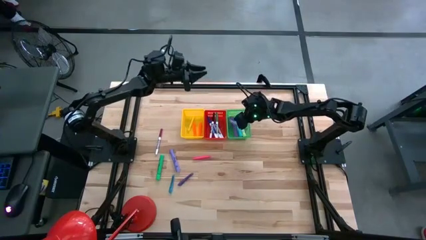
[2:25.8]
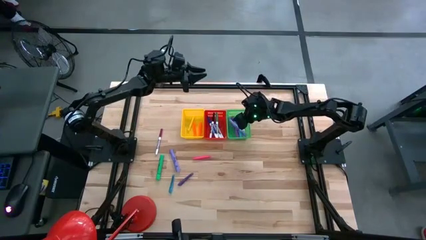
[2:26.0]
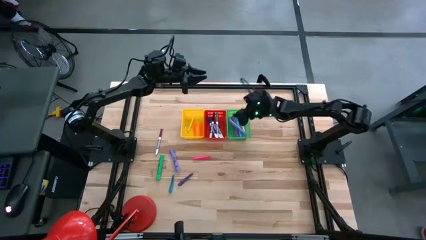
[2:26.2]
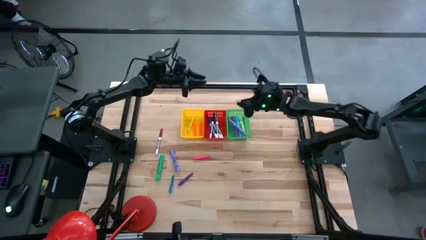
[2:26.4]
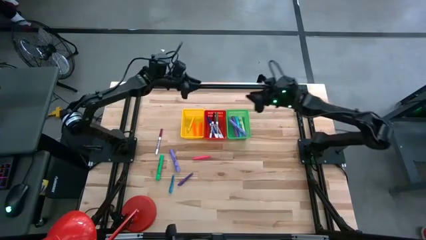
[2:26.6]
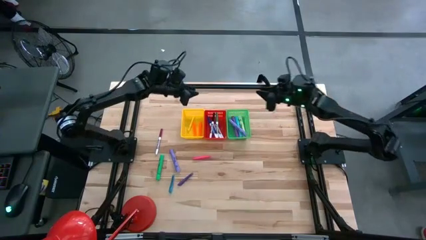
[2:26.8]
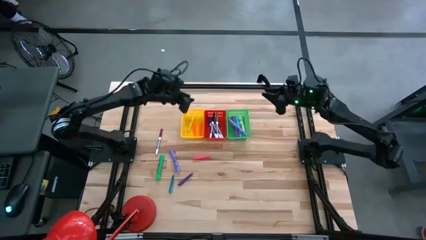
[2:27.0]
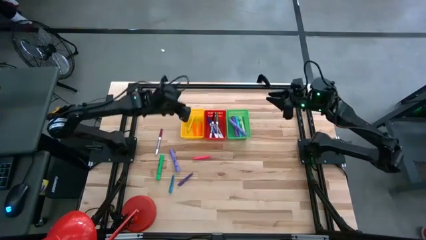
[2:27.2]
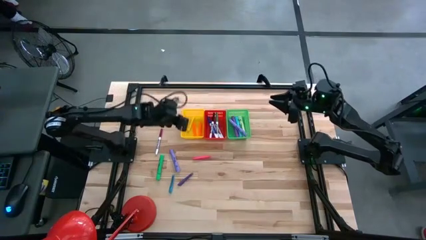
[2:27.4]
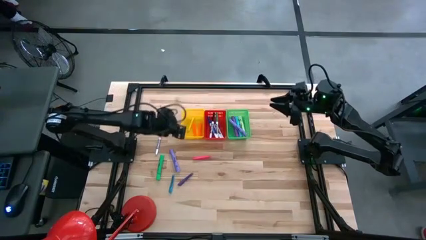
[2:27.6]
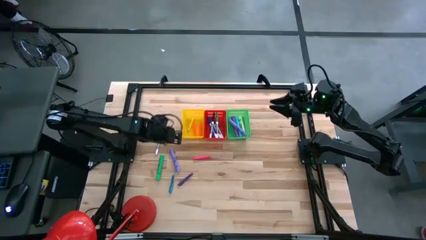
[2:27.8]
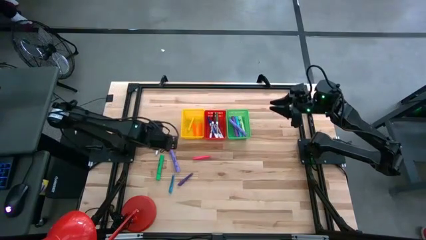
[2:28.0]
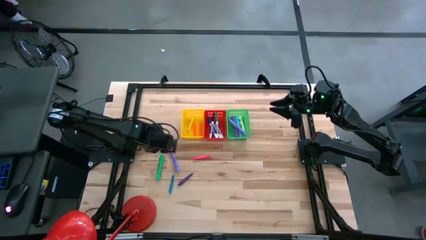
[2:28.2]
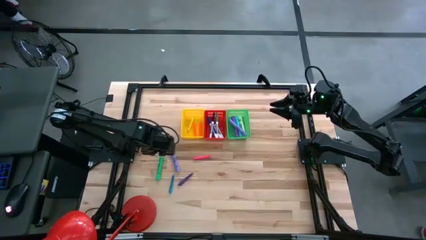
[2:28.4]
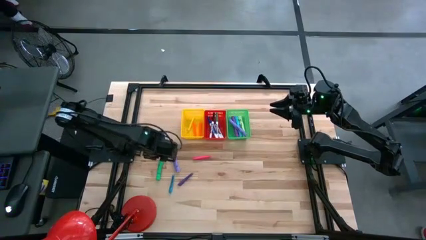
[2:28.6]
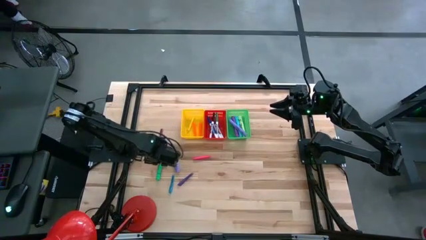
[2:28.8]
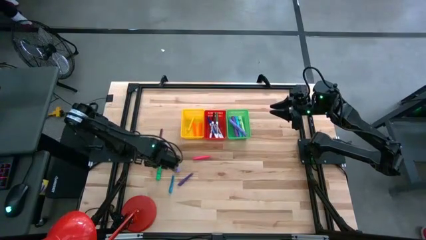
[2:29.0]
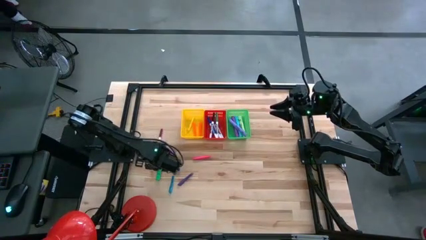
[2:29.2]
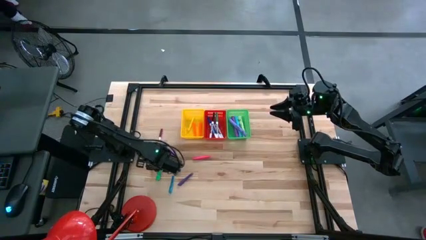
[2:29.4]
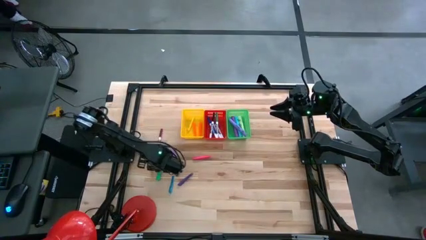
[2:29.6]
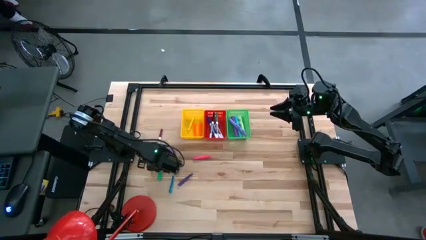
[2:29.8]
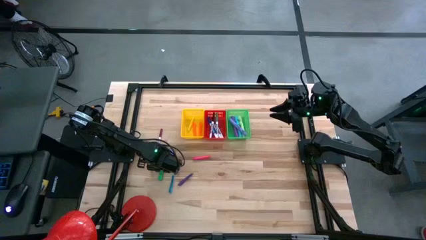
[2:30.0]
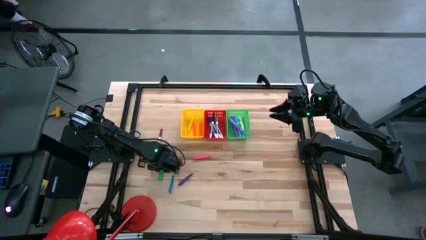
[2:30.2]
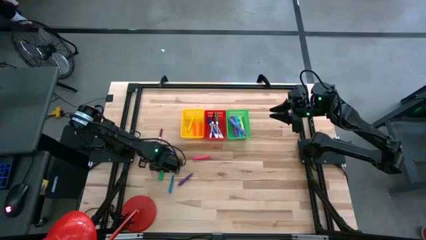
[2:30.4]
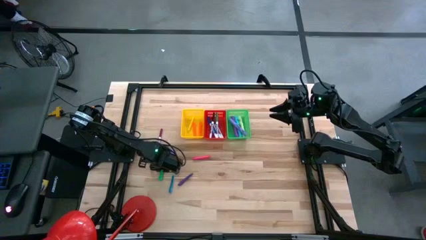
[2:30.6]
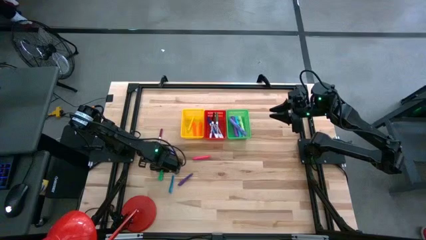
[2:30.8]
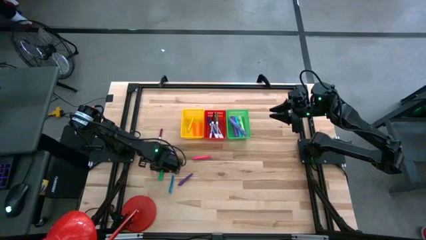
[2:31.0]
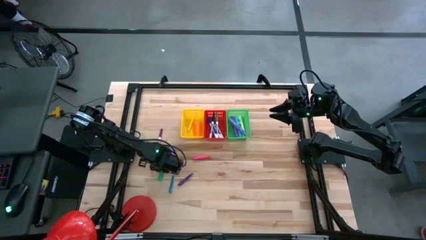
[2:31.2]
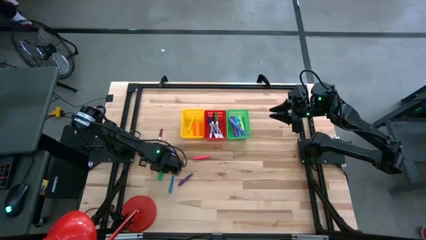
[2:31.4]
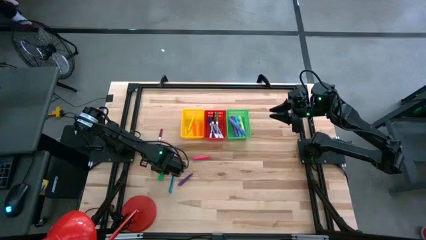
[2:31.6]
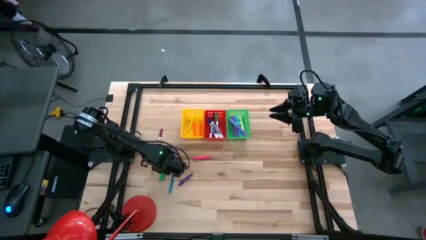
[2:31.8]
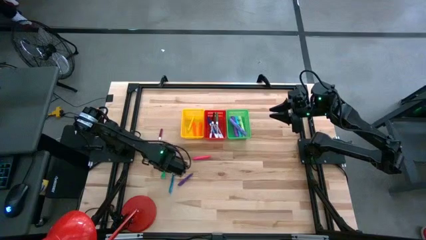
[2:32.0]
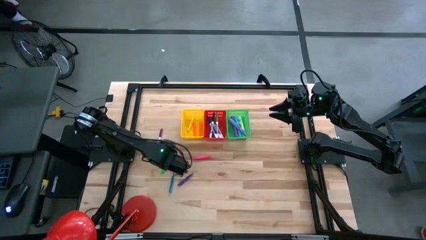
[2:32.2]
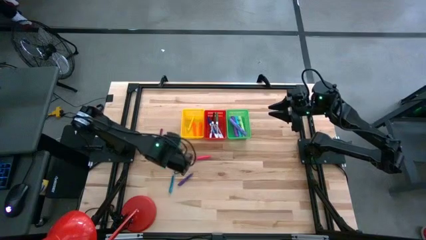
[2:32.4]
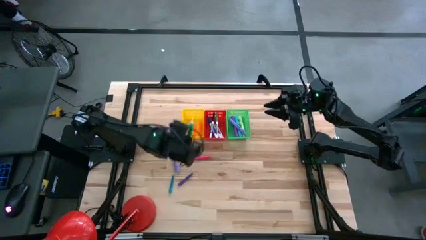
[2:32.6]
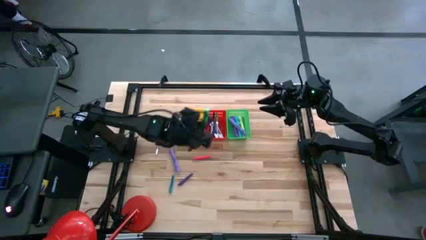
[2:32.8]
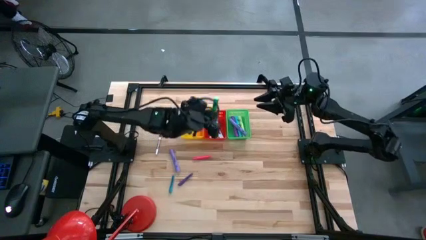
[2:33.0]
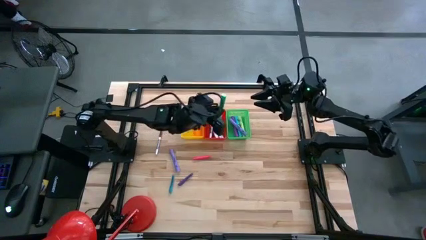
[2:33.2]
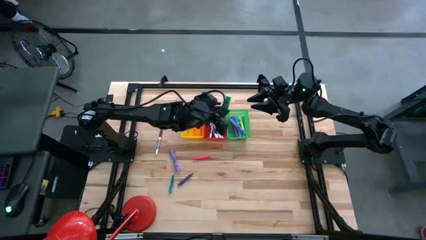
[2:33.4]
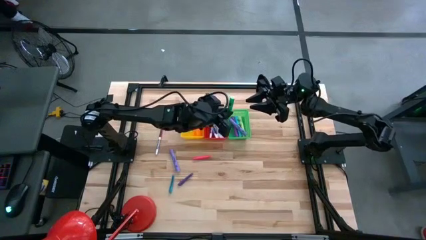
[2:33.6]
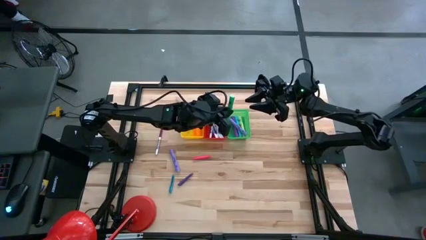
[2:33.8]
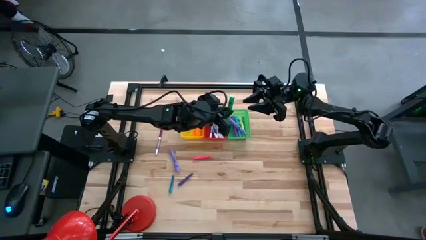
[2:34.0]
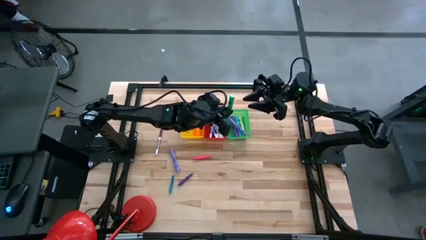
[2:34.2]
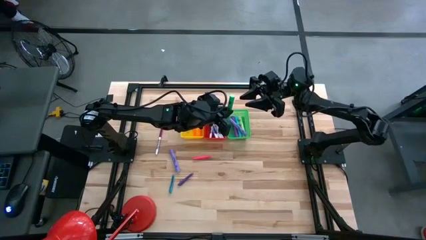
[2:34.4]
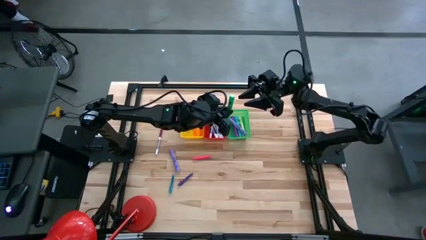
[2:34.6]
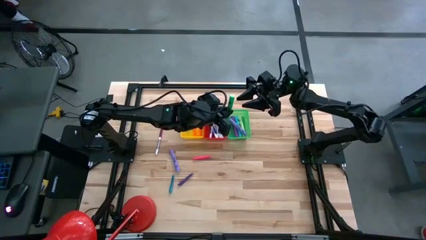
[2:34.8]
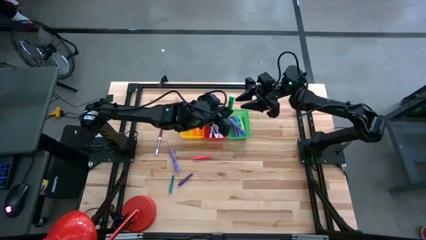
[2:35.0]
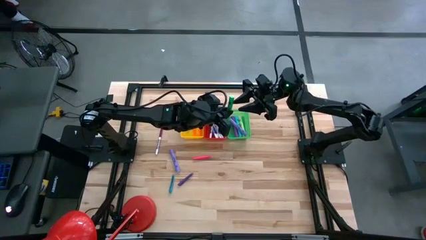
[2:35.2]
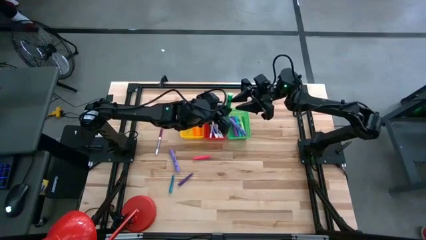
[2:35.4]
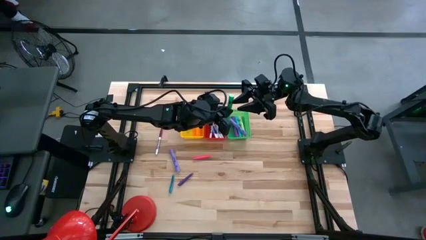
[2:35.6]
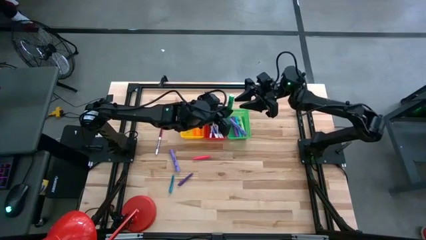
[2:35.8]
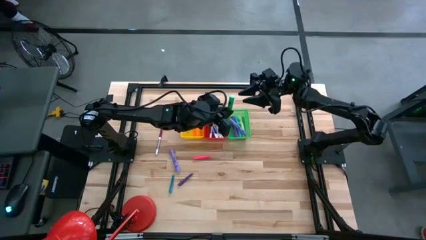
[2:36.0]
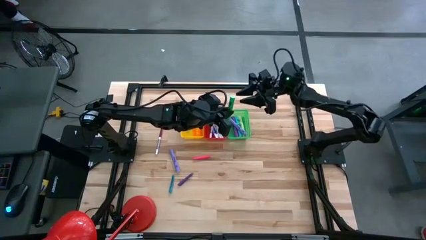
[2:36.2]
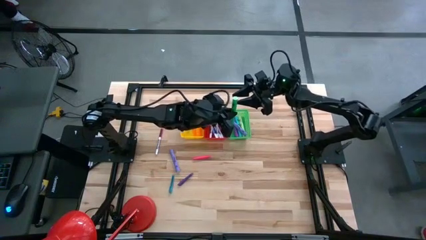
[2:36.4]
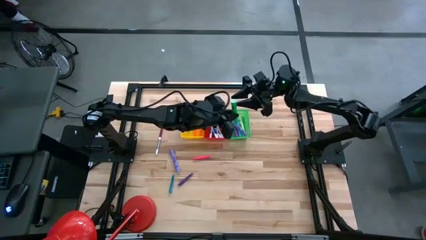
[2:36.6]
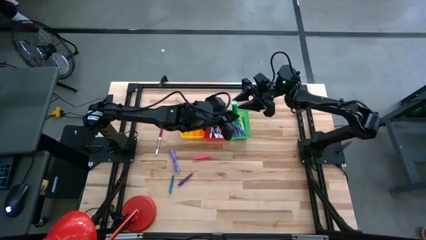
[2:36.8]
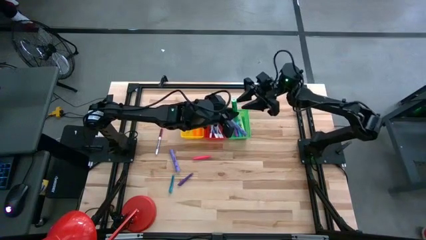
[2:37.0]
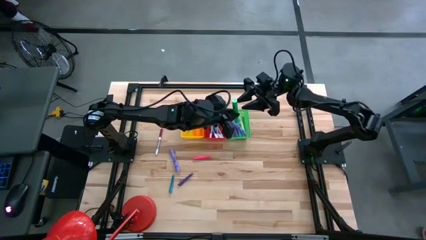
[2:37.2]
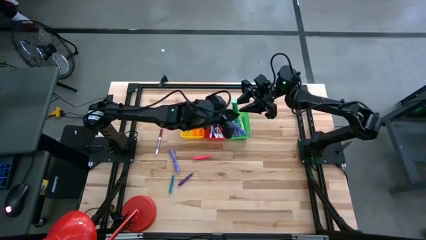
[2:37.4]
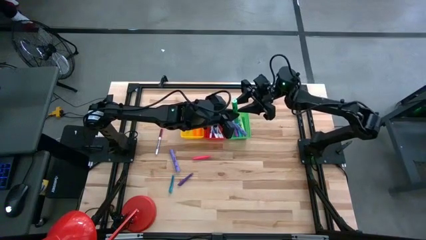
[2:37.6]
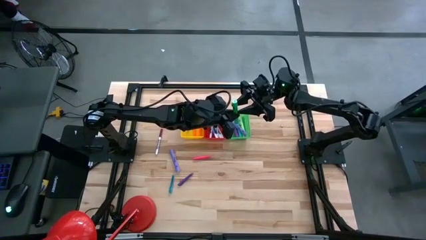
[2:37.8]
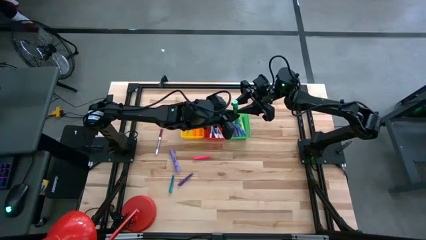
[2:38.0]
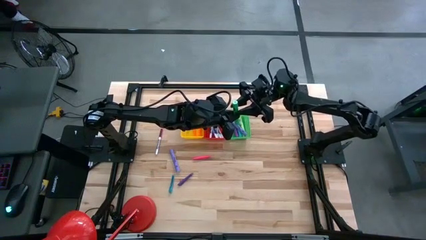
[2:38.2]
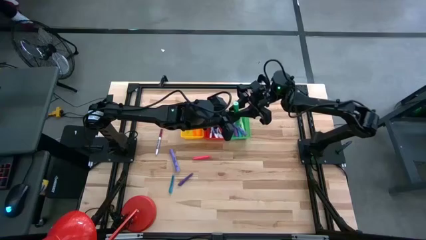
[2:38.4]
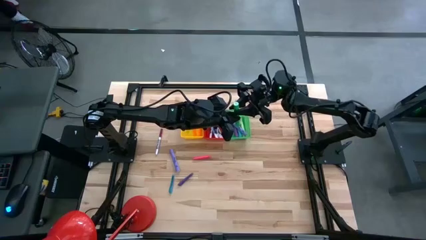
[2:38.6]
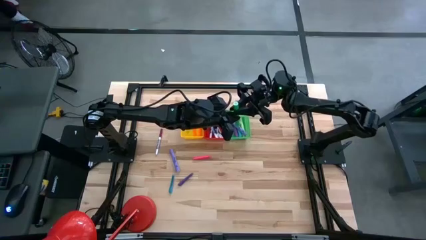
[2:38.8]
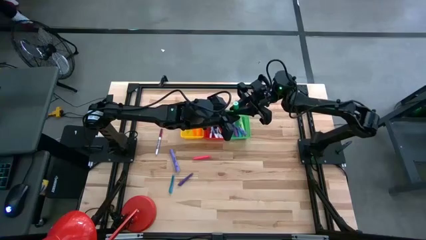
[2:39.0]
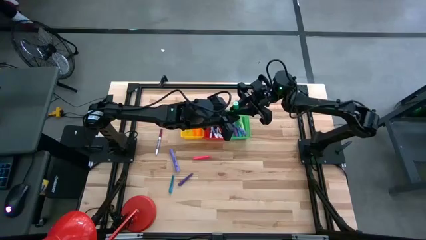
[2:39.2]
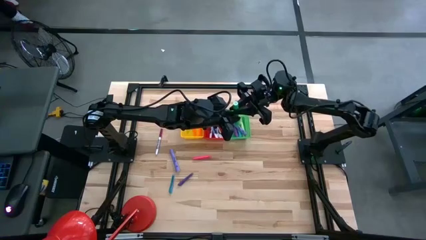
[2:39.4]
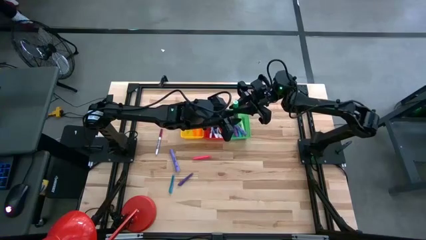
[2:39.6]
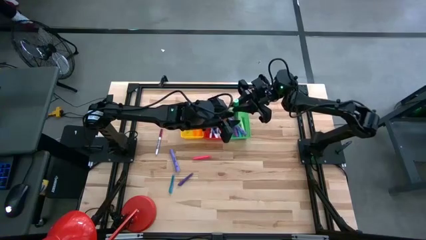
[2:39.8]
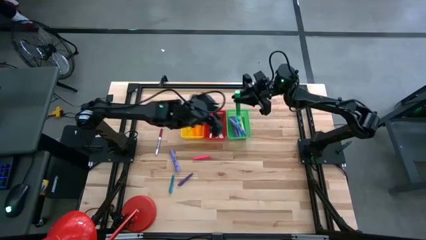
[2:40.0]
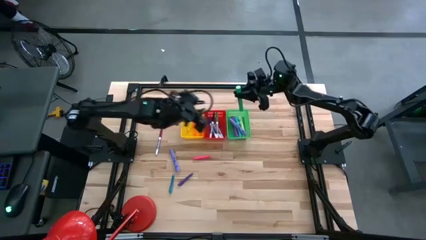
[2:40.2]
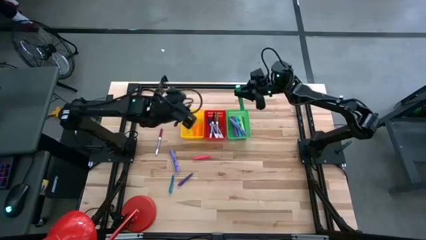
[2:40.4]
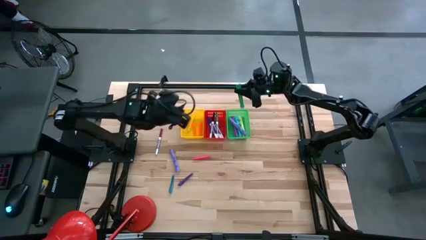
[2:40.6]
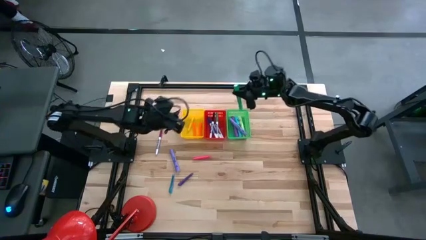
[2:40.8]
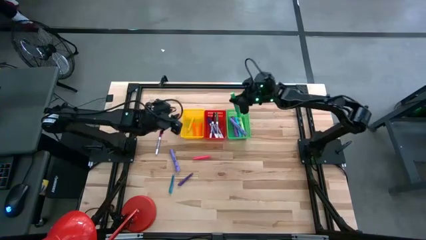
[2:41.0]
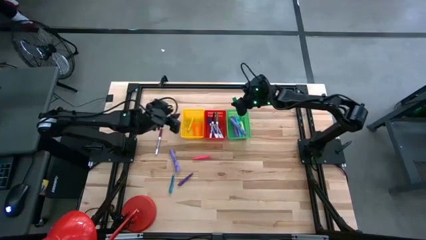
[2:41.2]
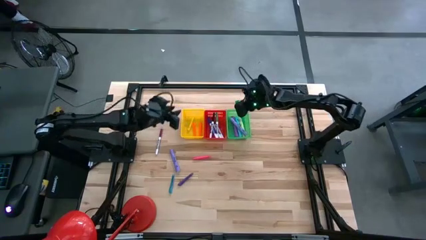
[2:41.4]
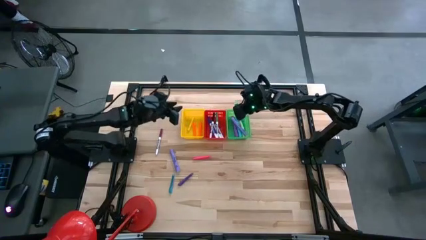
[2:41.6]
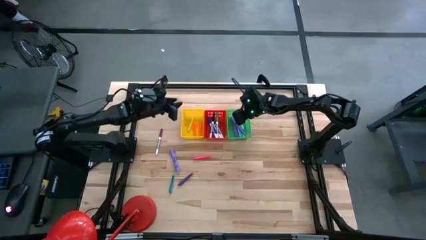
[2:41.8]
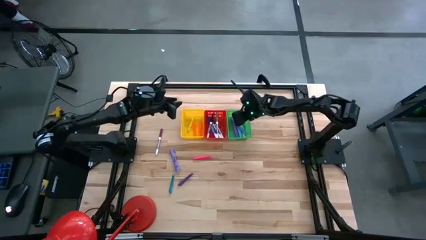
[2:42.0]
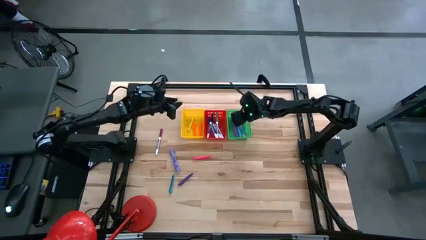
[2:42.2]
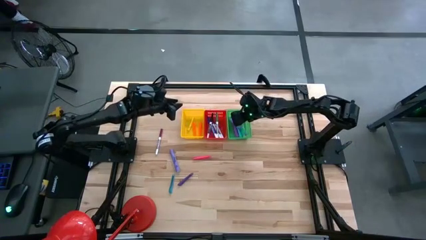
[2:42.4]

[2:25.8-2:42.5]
Task: Pick & Place Markers
Put the green highlighter into the green bin
